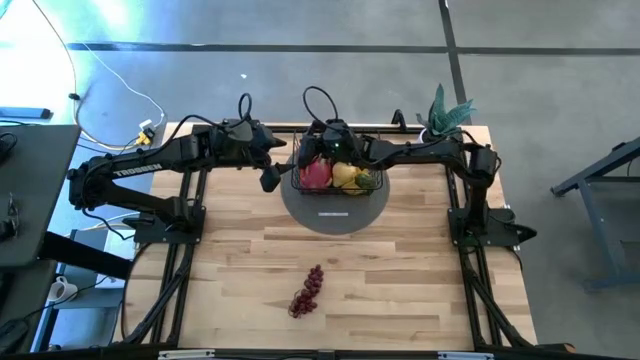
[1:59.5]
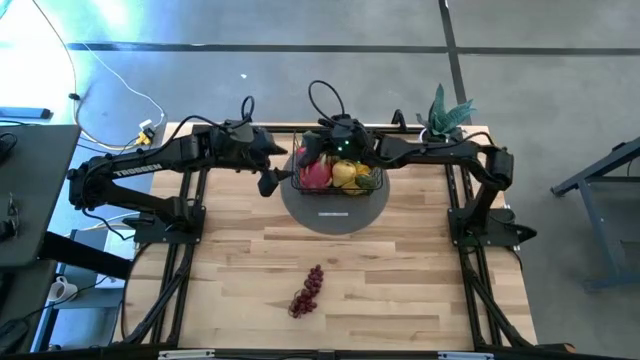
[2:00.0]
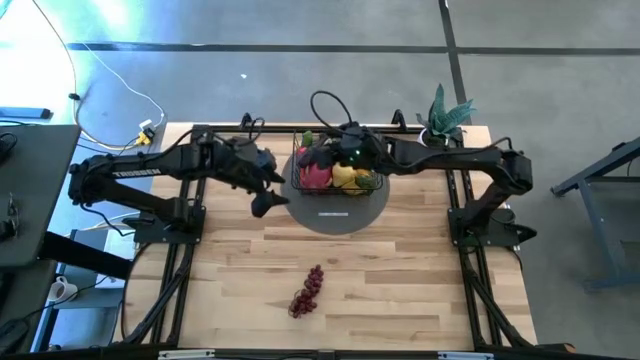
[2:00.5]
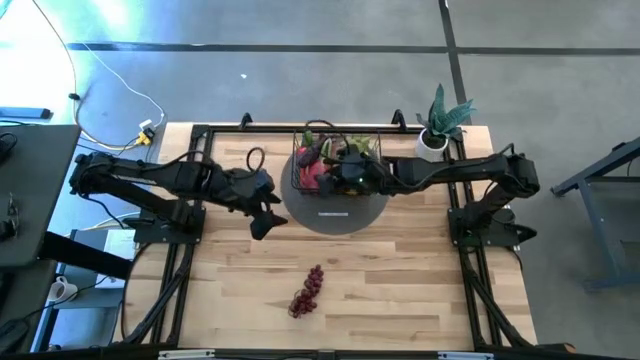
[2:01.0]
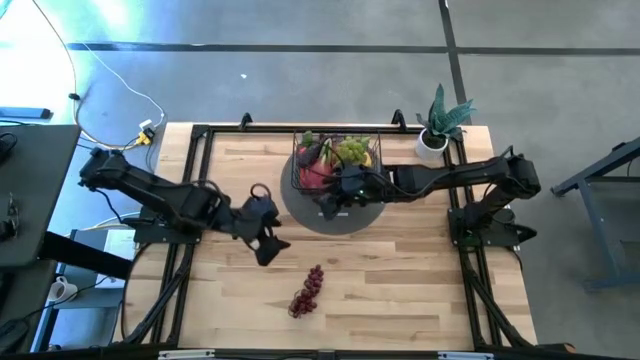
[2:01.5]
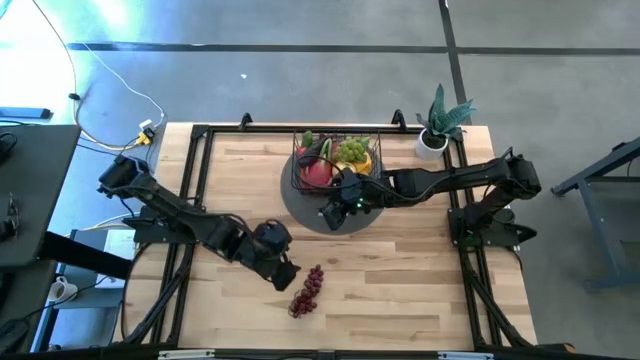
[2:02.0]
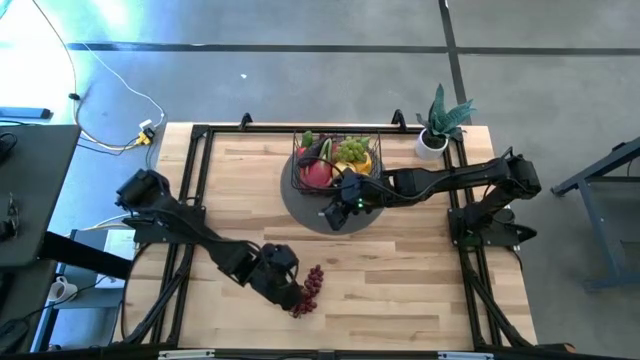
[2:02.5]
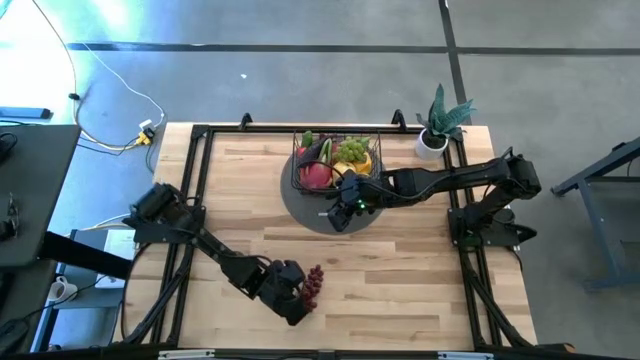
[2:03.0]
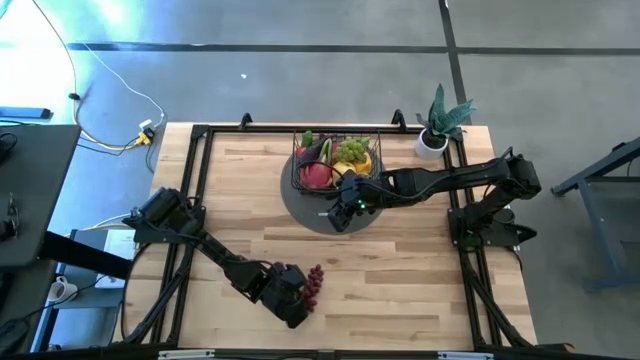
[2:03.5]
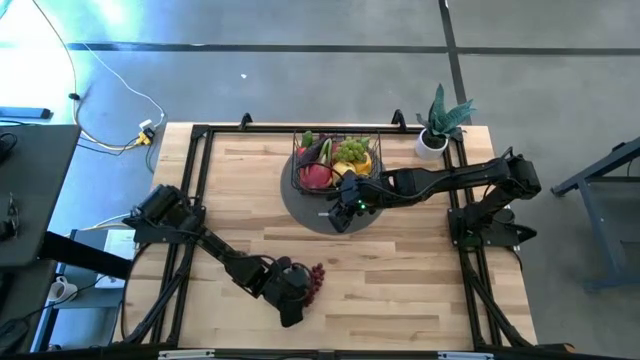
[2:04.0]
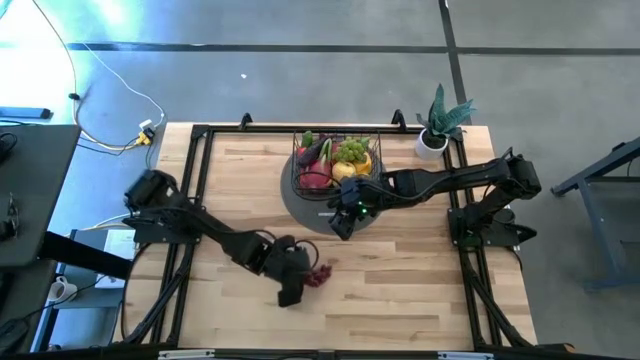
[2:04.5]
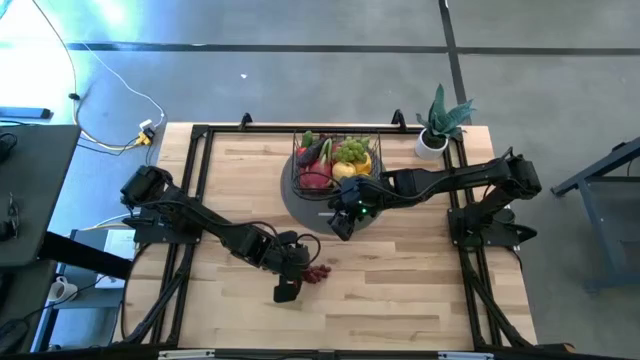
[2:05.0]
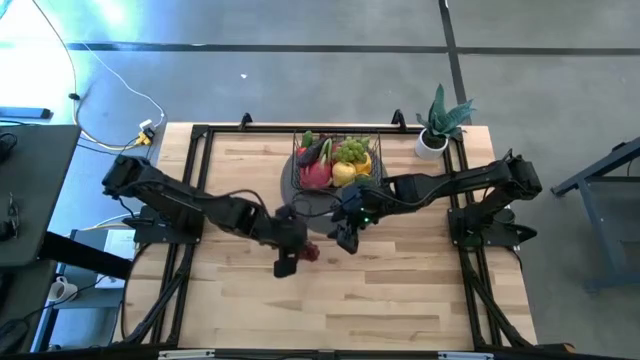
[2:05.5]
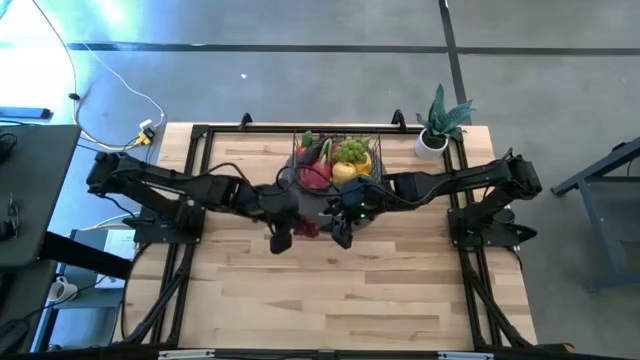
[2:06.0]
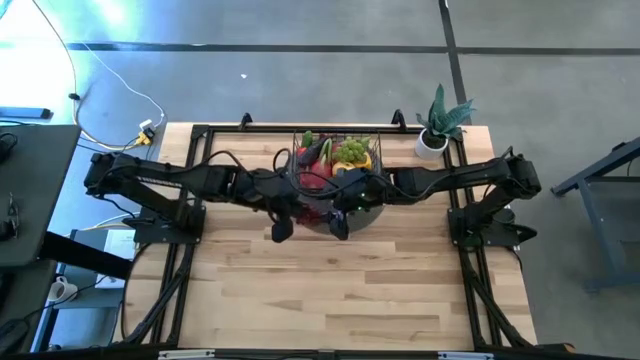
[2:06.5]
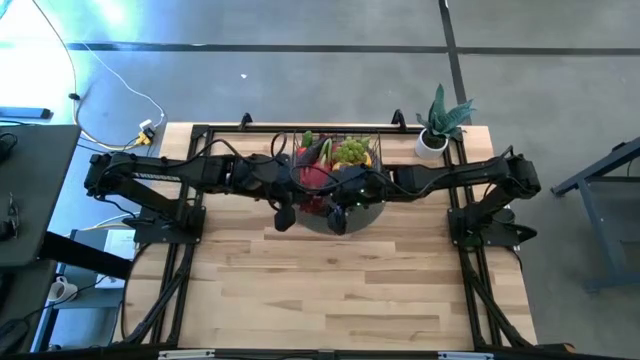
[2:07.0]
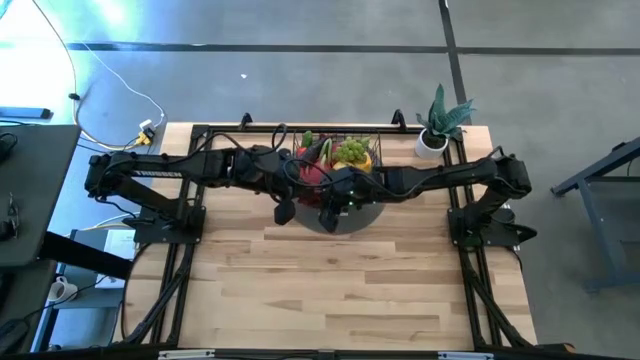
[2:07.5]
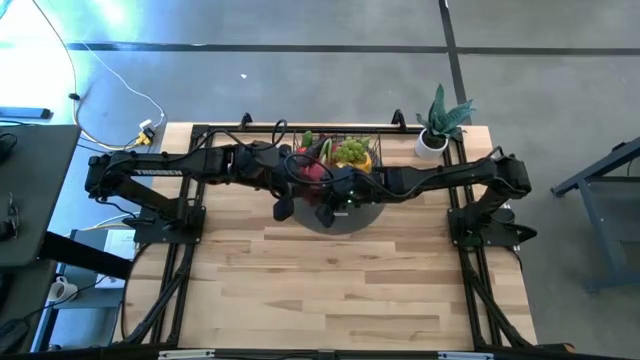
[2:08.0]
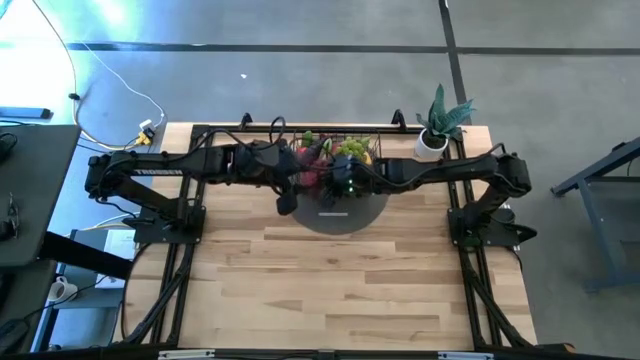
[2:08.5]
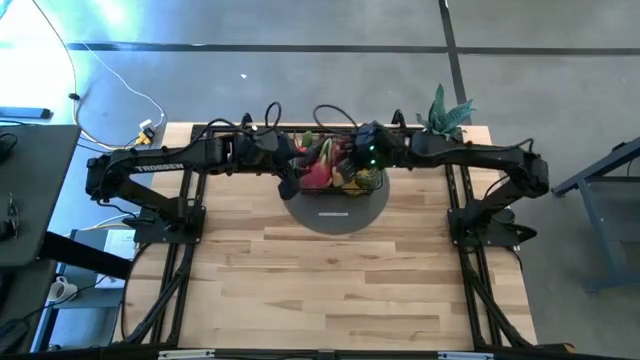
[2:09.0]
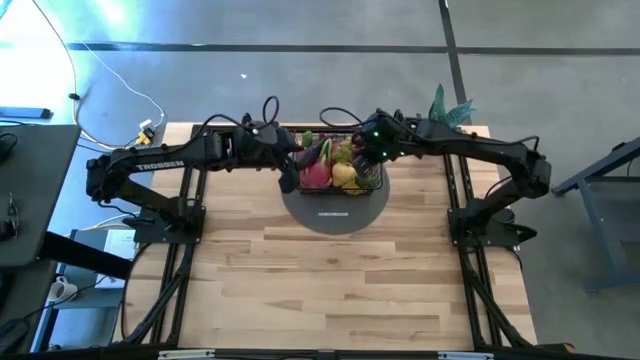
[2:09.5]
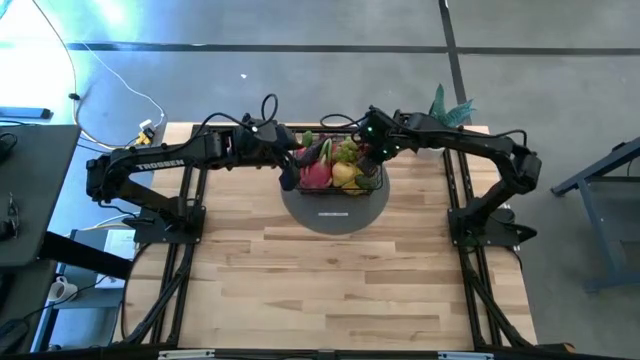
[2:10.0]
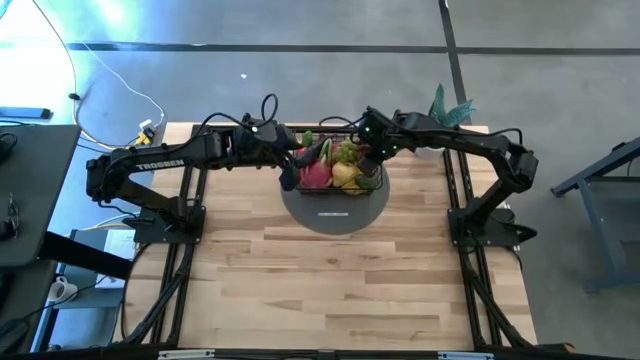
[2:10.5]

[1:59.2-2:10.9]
Task: Build produce basket
Put the red grapes into the wire basket

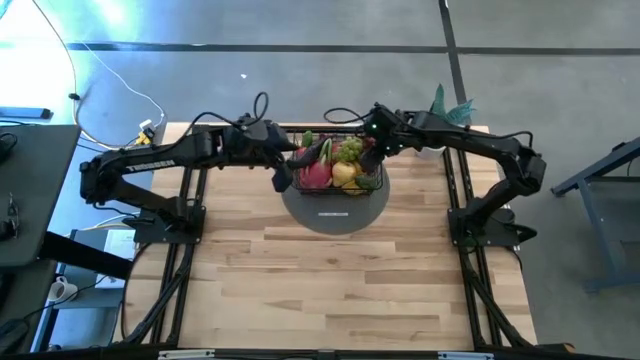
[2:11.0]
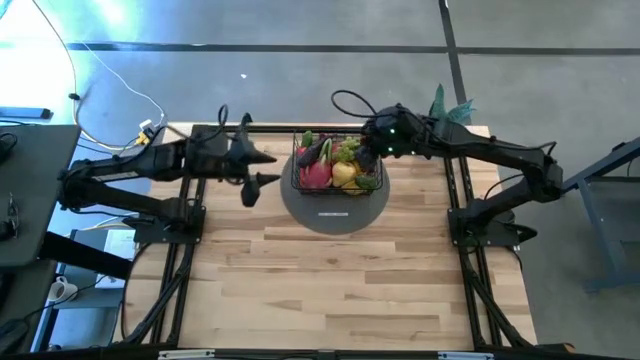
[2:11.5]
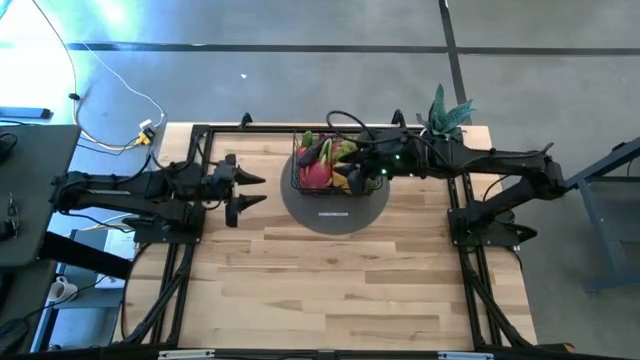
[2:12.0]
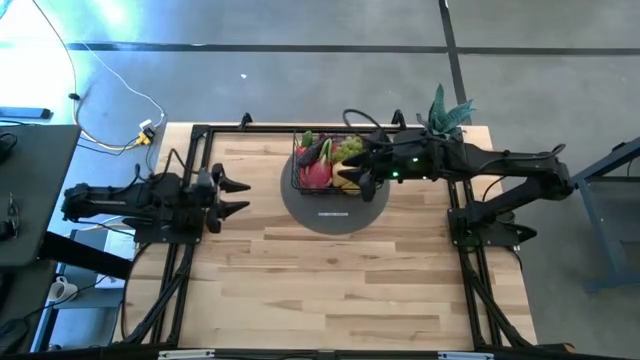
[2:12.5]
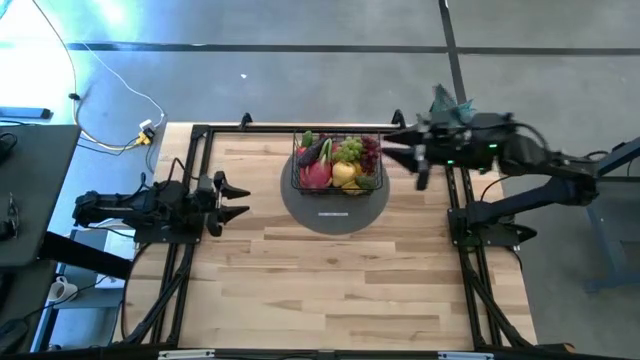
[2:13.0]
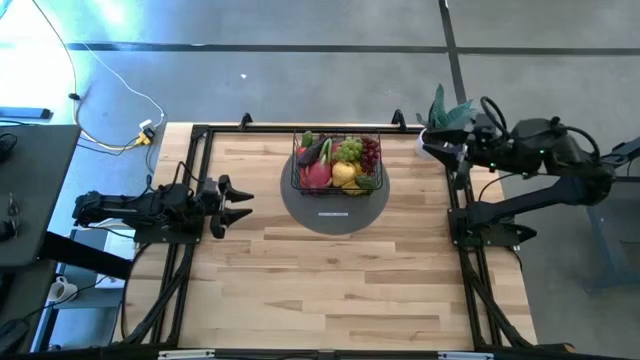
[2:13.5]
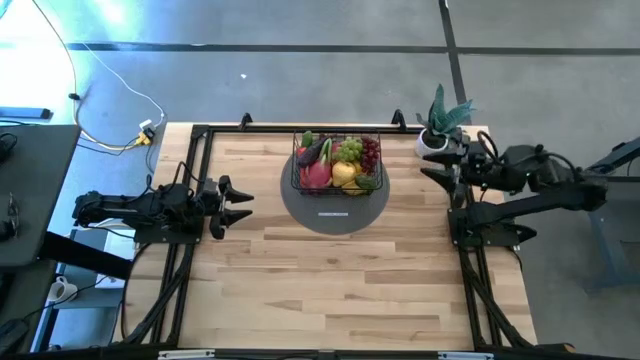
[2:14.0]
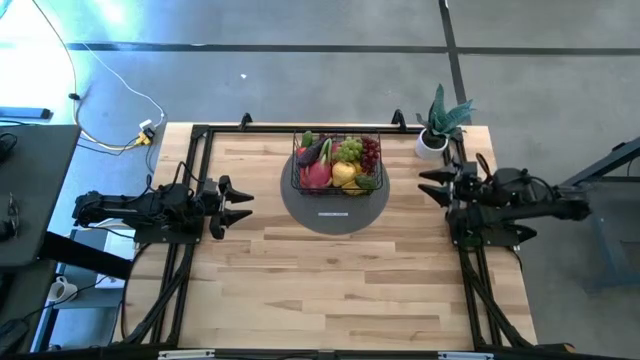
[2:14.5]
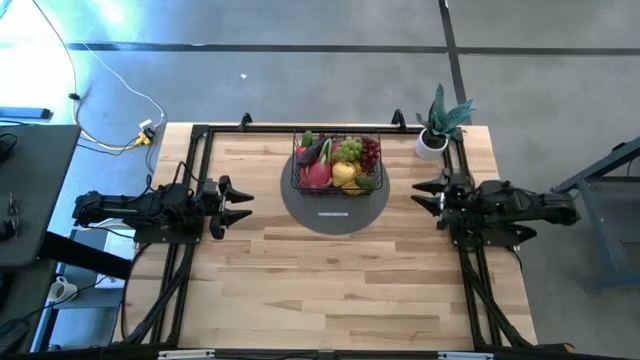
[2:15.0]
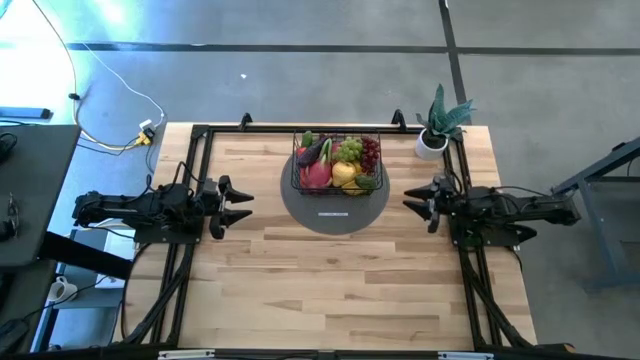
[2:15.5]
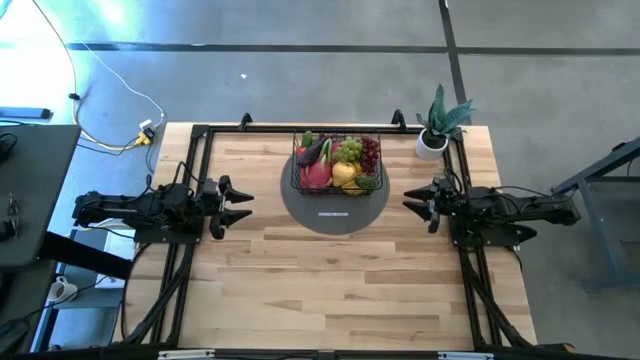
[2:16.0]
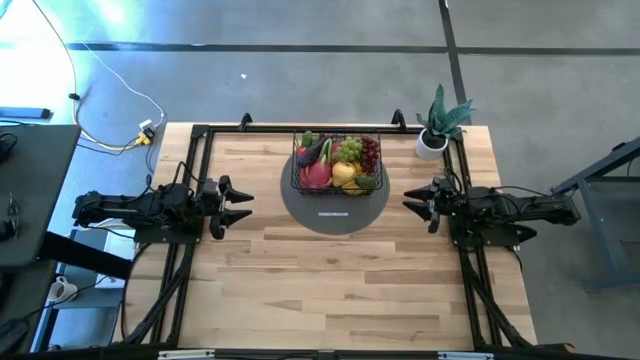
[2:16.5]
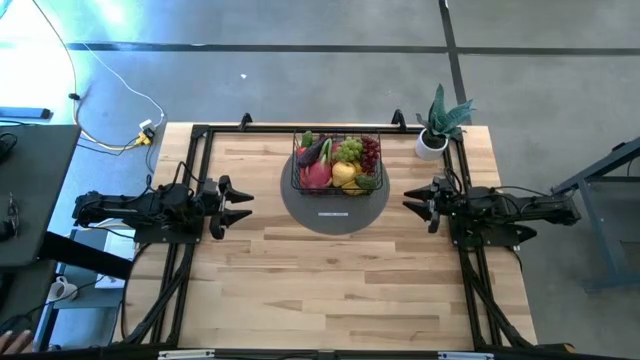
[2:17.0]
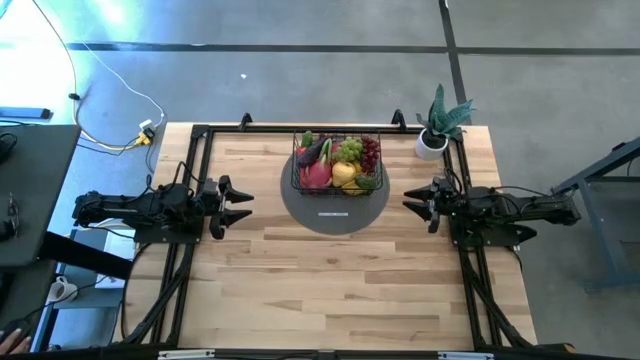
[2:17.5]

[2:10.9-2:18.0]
Return to Home Position

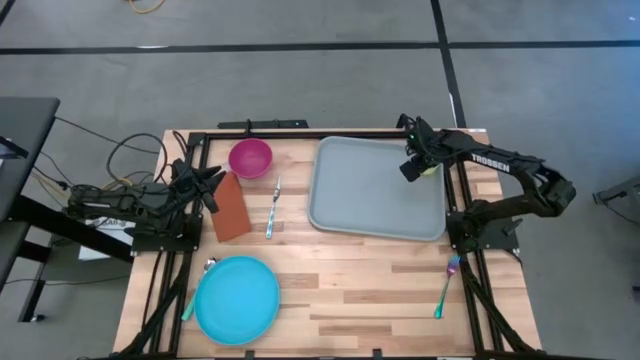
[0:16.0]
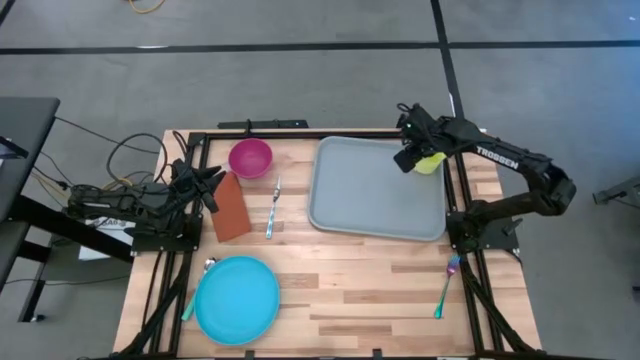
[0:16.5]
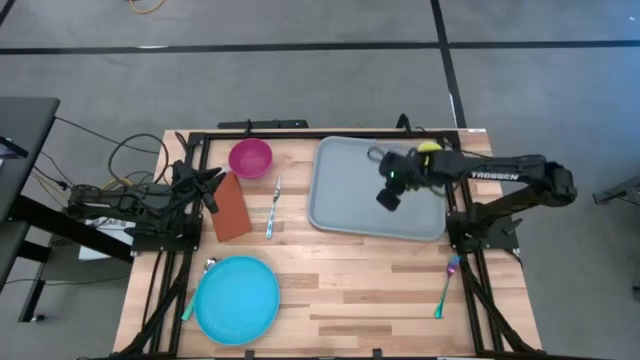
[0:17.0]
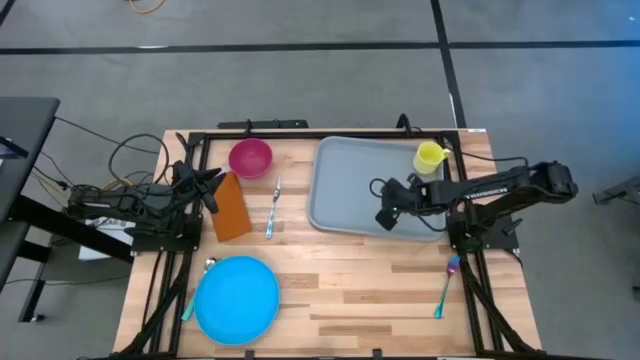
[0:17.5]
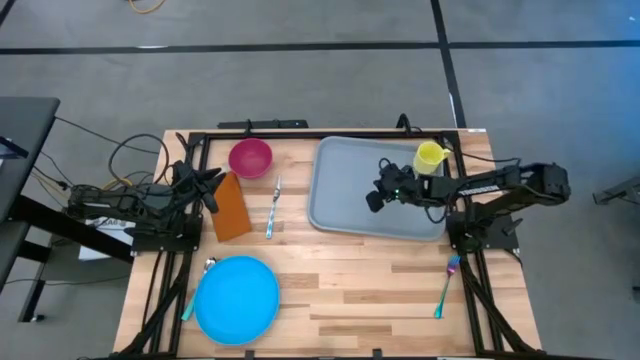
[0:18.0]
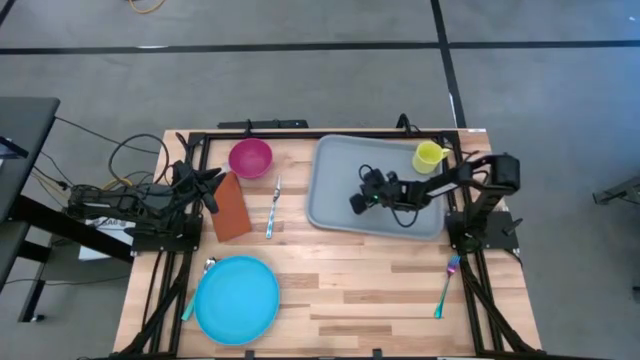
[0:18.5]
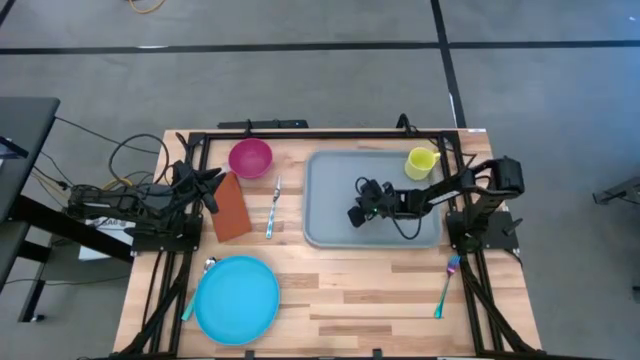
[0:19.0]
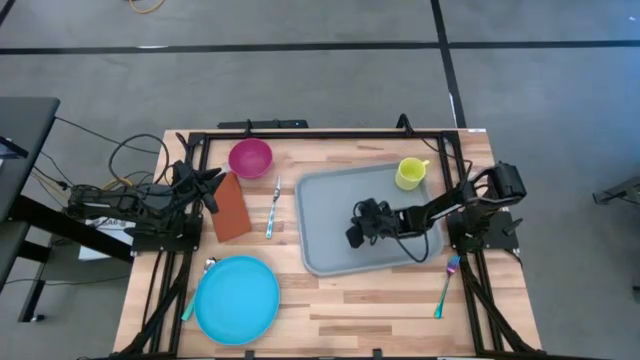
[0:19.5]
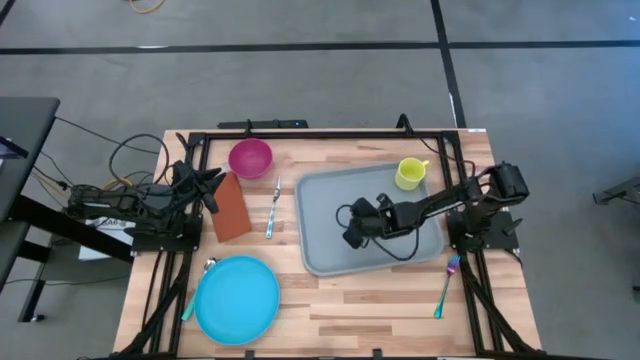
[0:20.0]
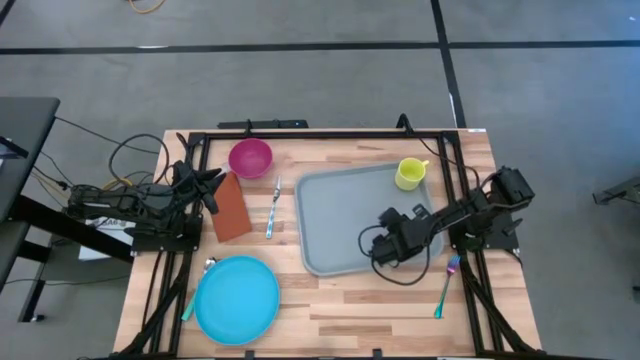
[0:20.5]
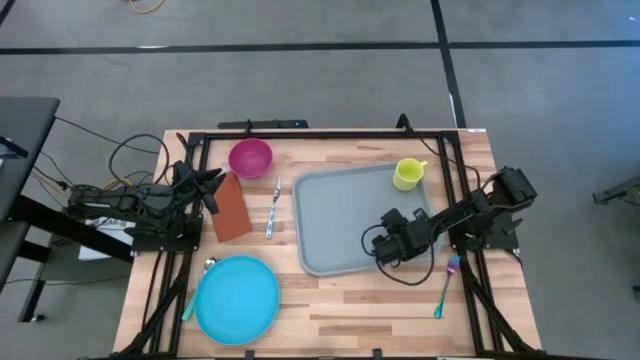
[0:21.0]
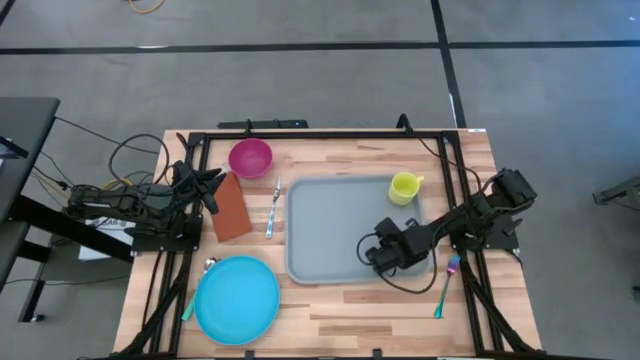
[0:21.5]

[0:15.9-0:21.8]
Task: Set up tray
Move the gray tray to the center of the table
